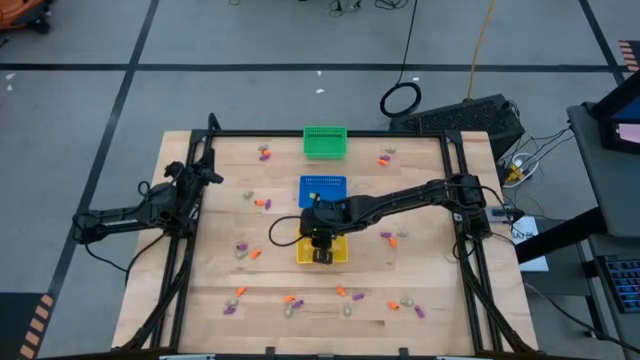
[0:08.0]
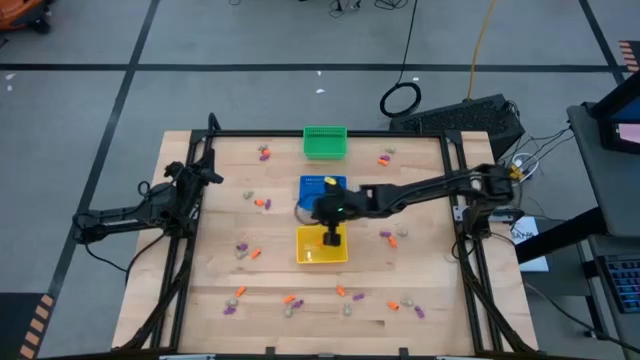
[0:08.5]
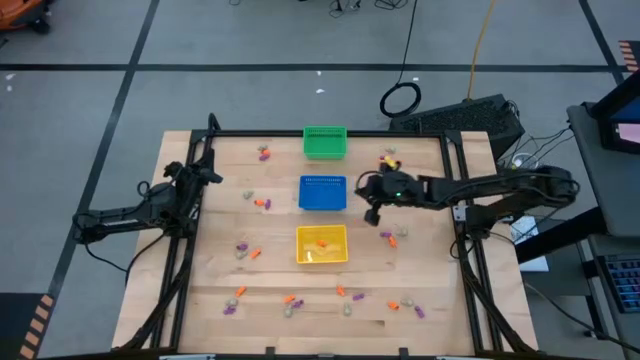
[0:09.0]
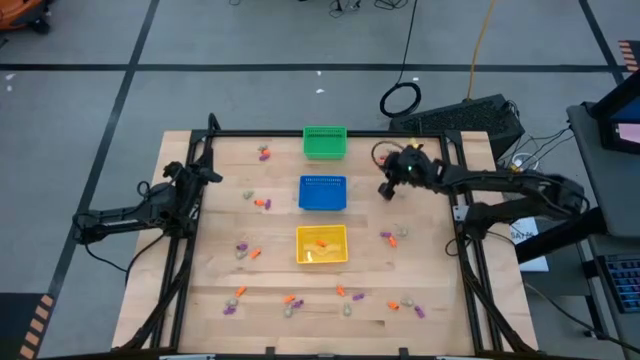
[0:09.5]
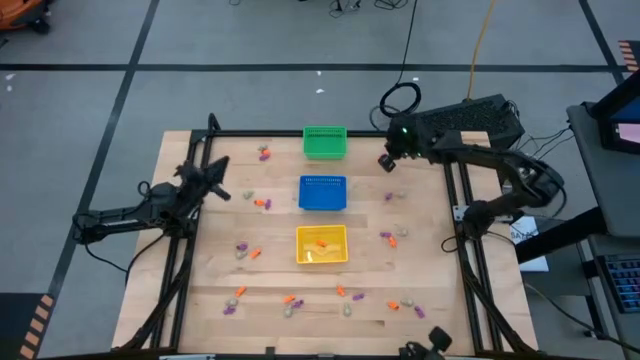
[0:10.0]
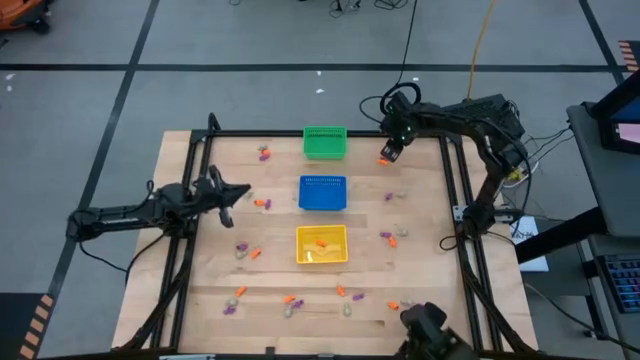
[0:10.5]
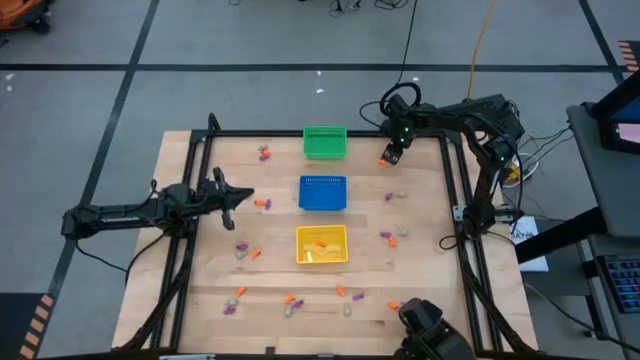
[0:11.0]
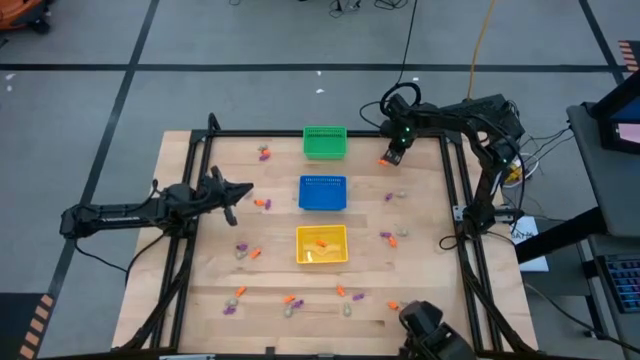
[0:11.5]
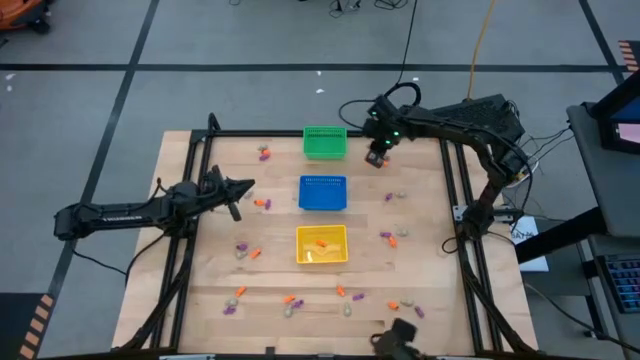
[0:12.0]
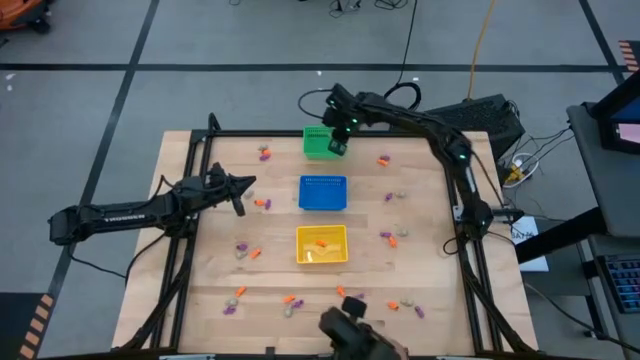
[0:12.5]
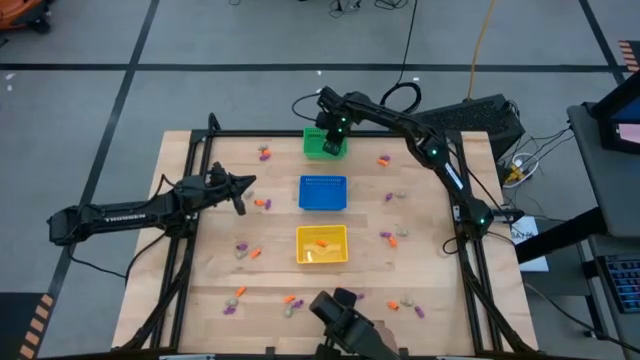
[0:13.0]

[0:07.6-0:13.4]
Task: Sort Halloween decoration
Put the white skull toy into the green bin

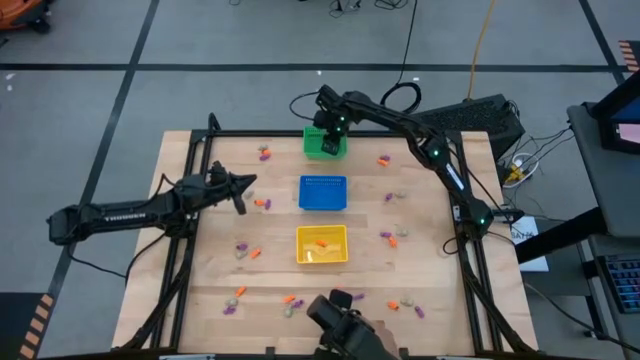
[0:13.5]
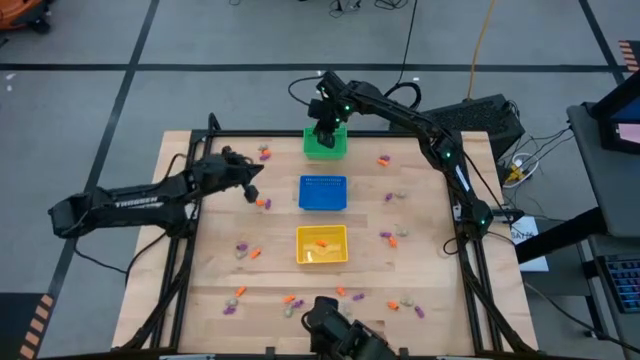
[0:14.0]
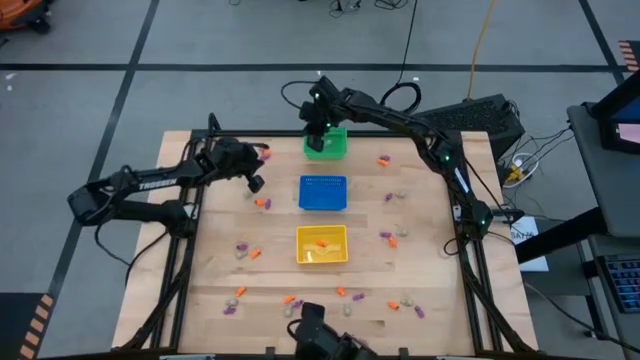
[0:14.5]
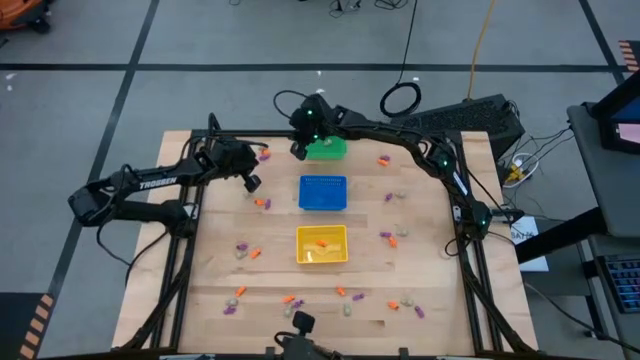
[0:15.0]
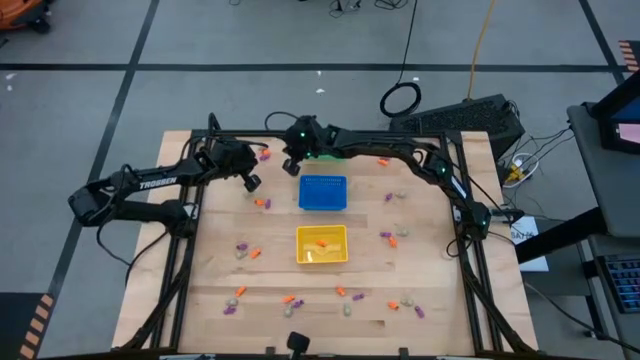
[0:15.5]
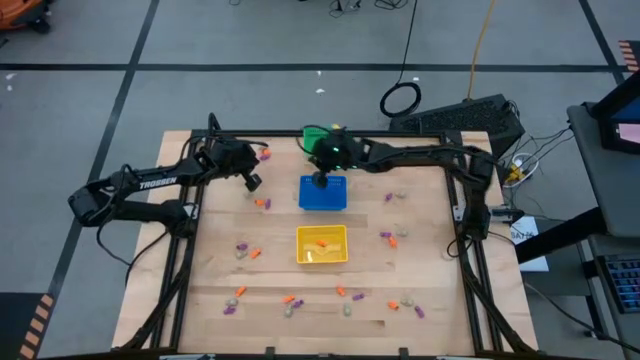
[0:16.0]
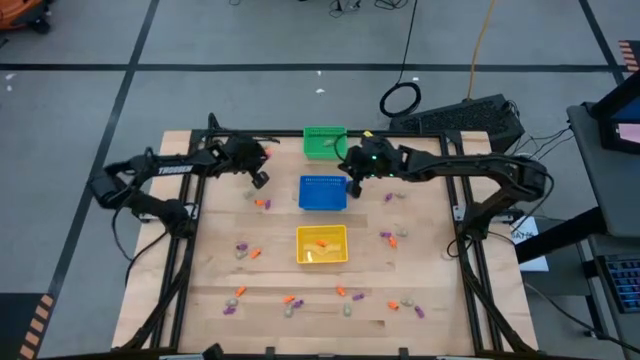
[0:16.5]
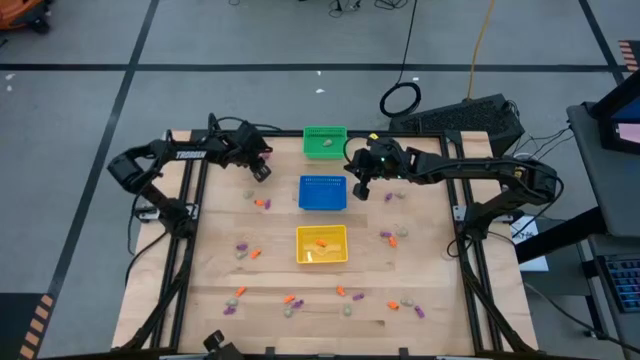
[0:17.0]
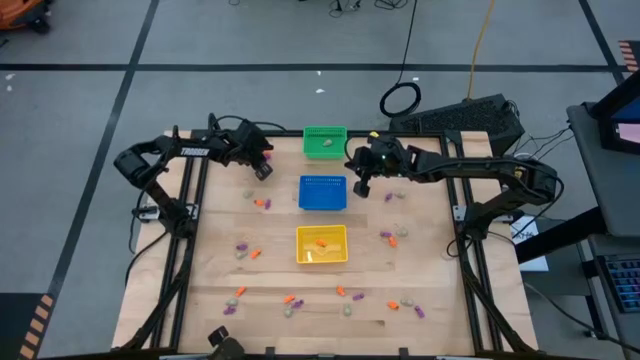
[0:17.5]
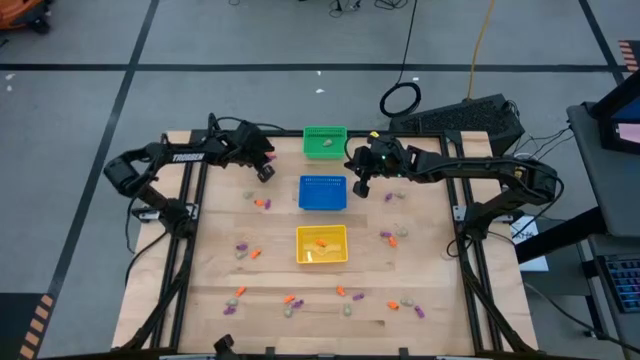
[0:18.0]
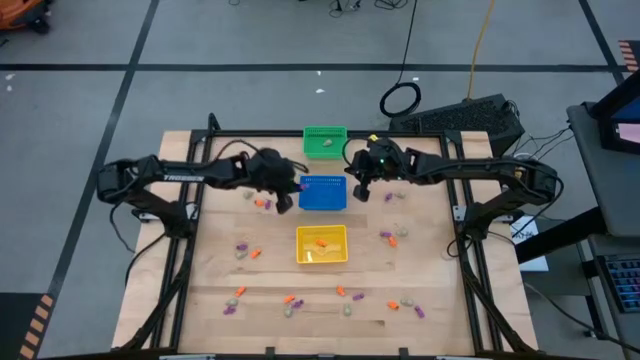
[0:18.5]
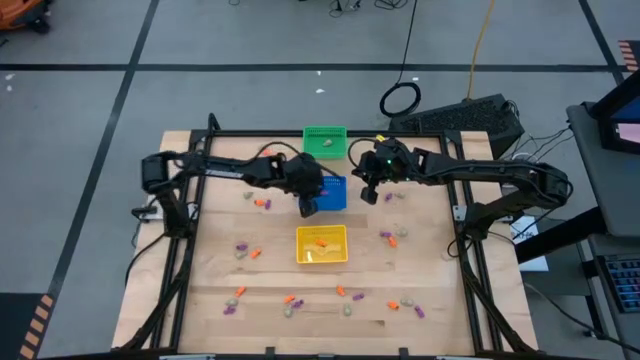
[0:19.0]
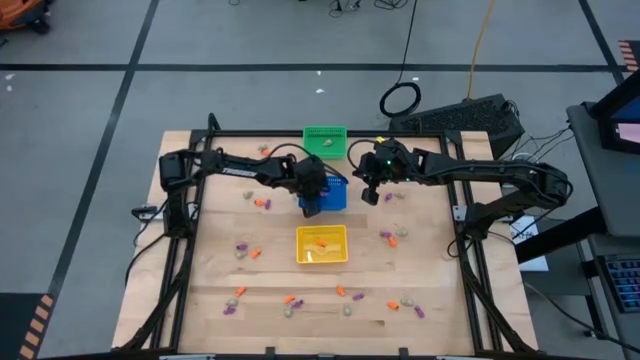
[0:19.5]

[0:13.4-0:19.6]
Put the purple skeleton toy into the blue bin

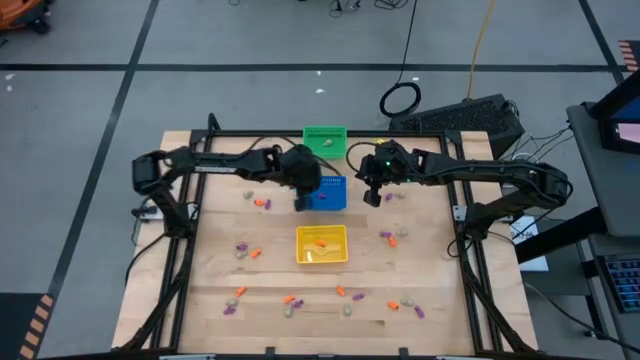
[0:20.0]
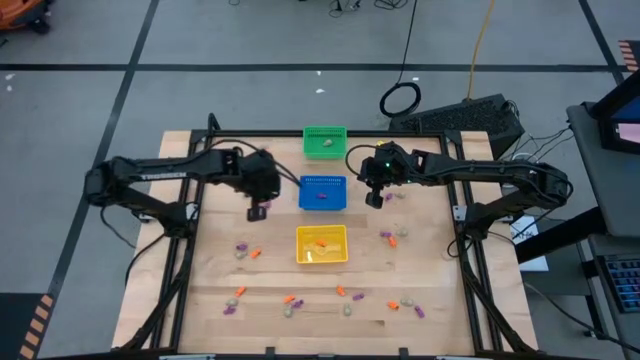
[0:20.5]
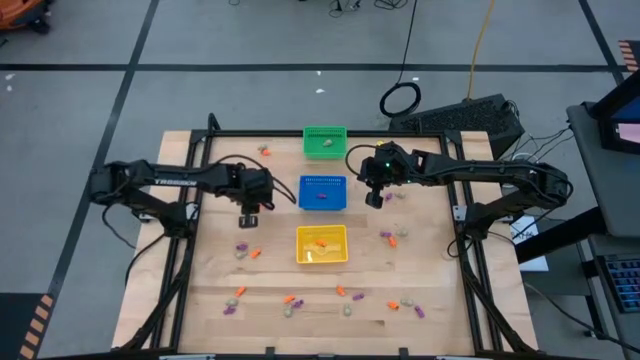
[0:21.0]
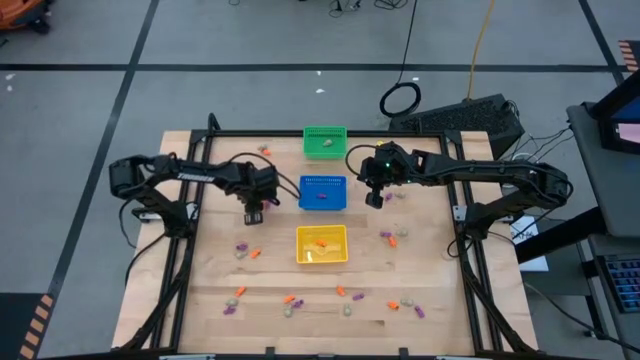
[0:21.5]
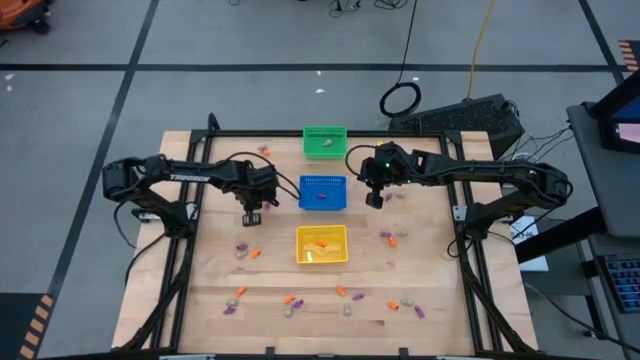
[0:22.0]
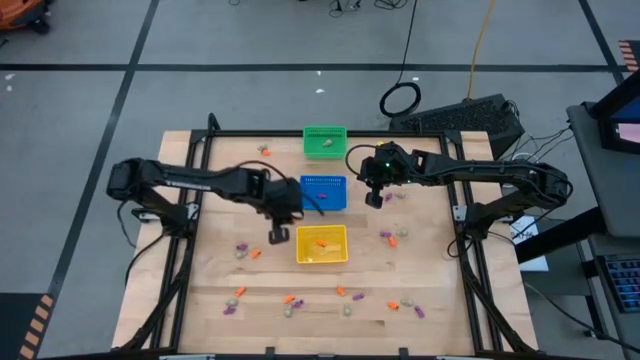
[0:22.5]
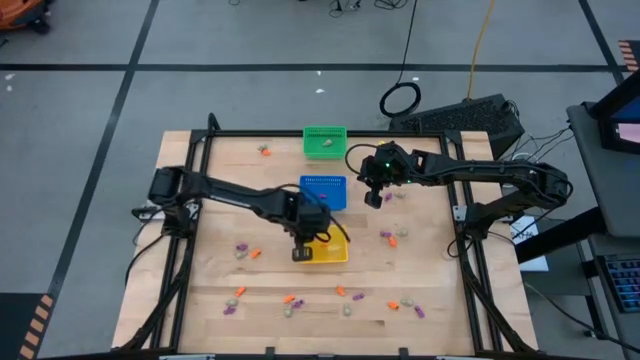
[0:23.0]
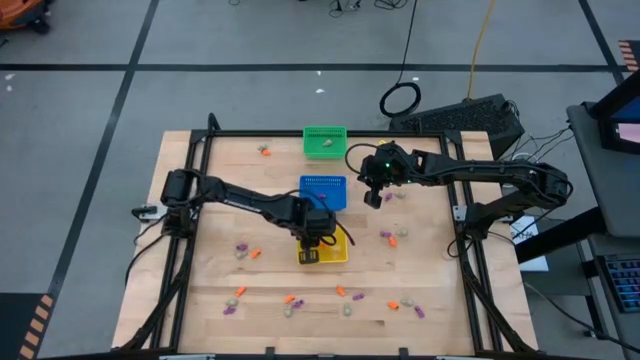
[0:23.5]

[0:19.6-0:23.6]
Put the orange skeleton toy into the yellow bin

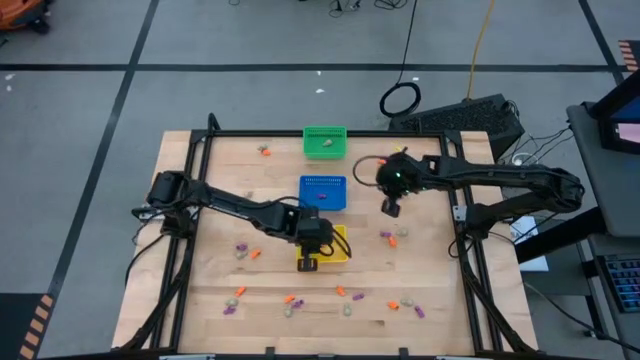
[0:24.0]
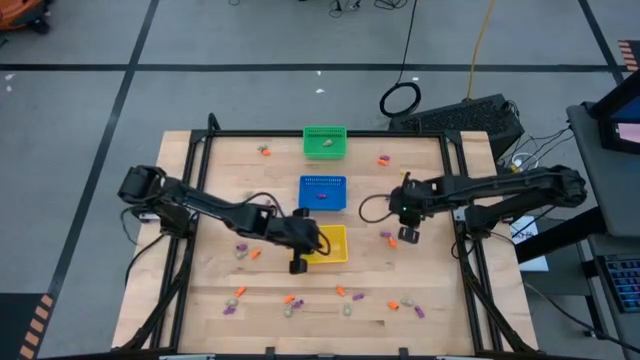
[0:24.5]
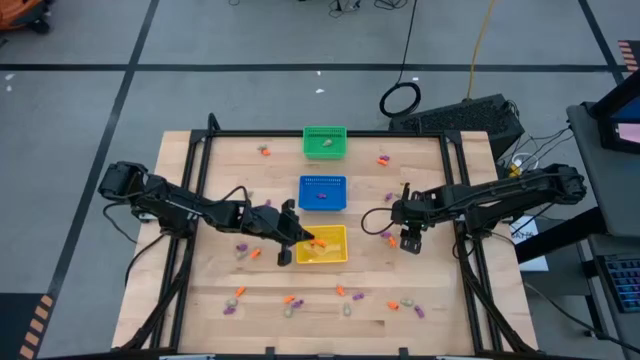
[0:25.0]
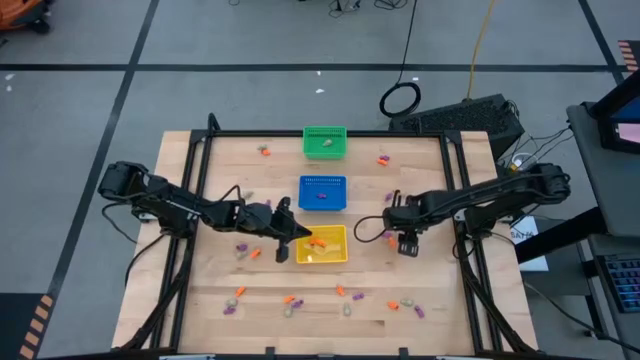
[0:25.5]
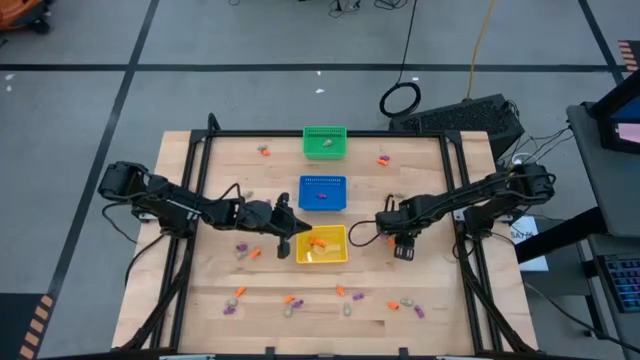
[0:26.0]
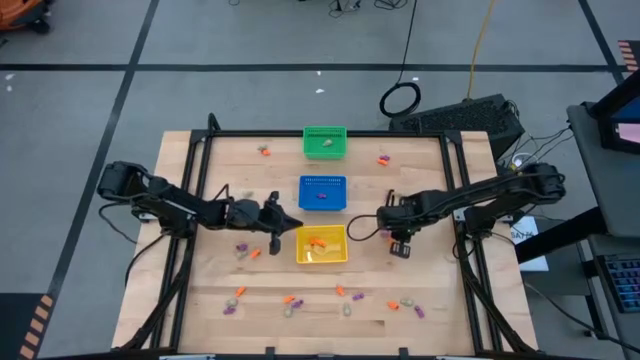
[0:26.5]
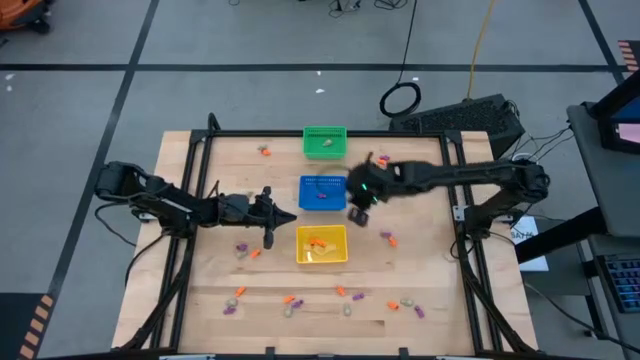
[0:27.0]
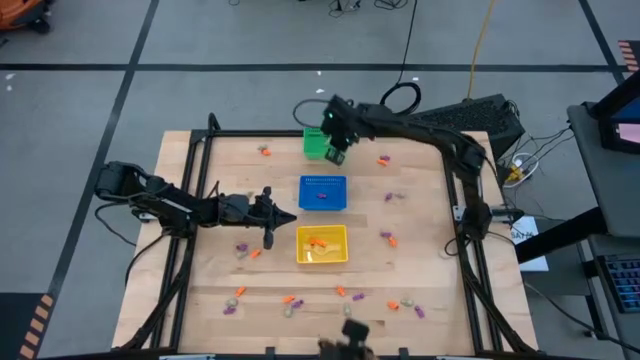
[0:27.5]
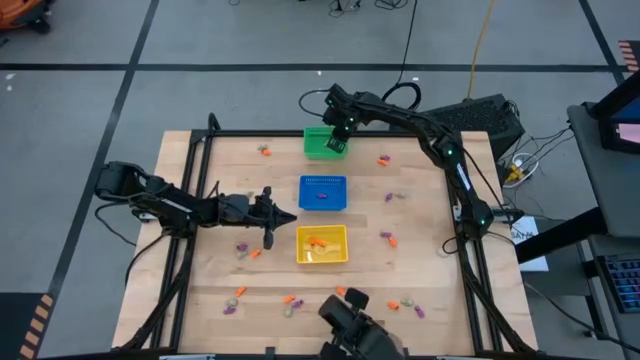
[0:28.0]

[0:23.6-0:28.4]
Put the white skull toy into the green bin

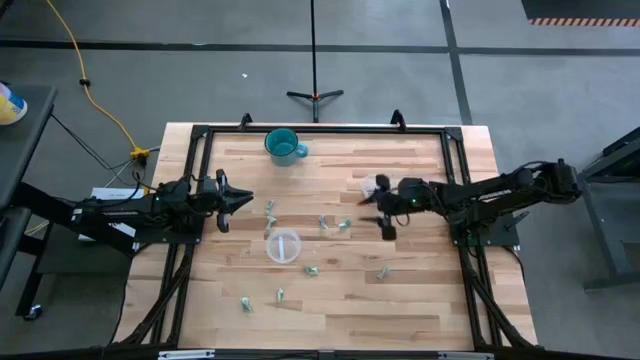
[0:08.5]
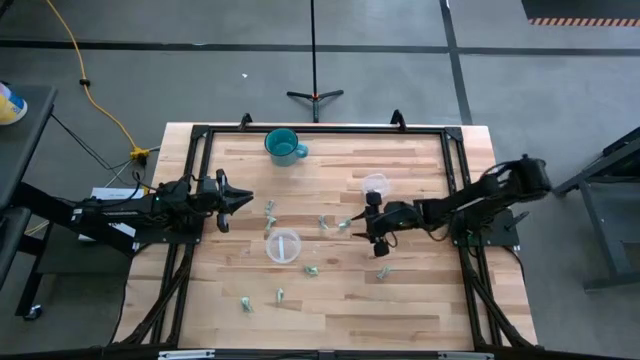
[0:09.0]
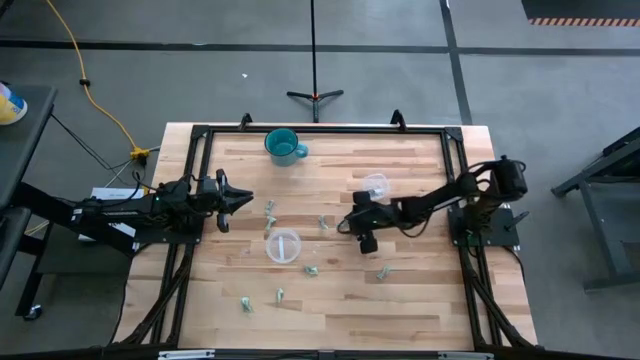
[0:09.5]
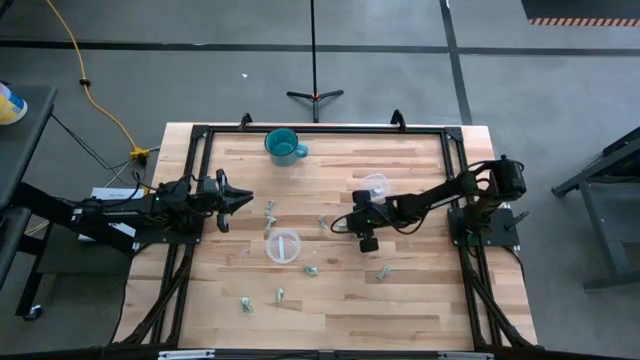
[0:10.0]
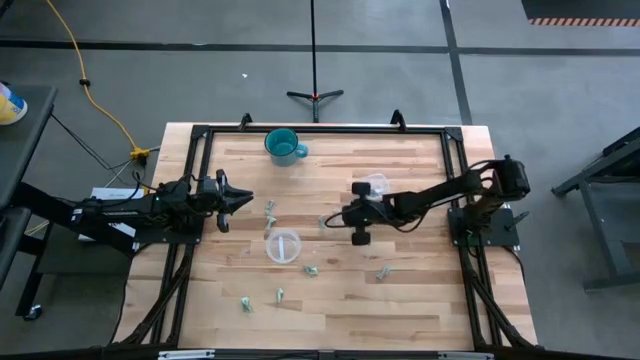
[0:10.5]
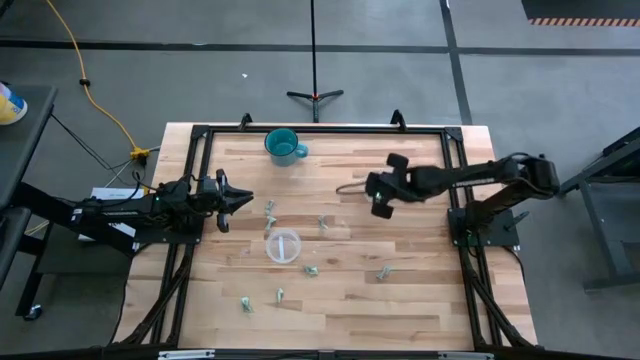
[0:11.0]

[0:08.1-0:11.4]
Task: Pick and place items into bin
Put the stevia packet into the right transparent bin
